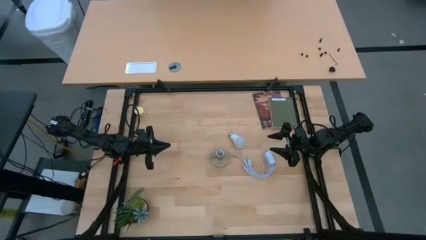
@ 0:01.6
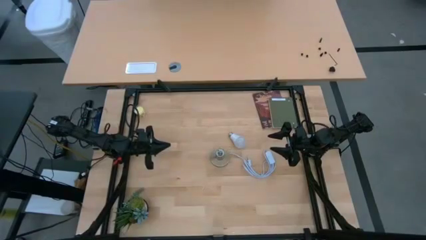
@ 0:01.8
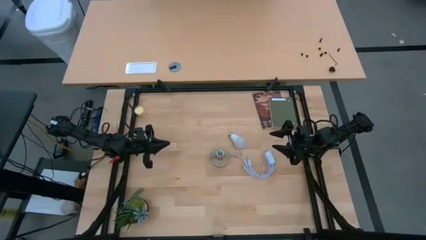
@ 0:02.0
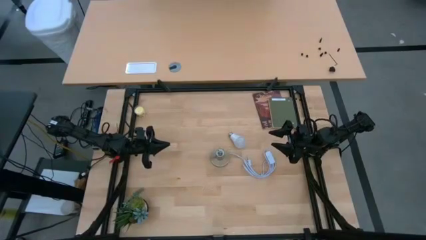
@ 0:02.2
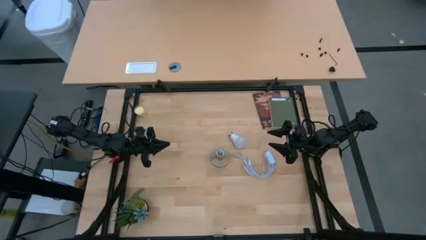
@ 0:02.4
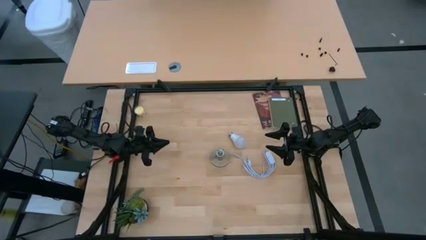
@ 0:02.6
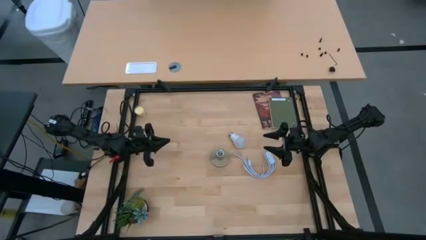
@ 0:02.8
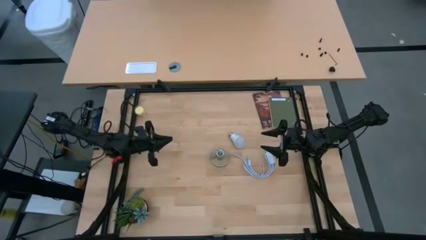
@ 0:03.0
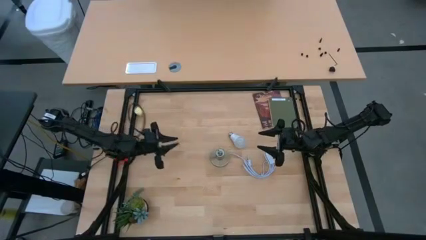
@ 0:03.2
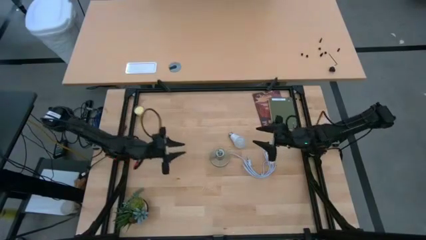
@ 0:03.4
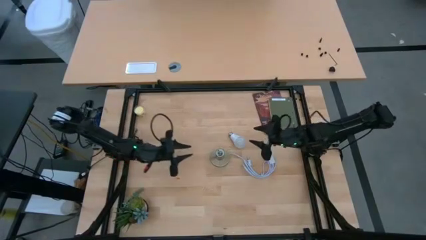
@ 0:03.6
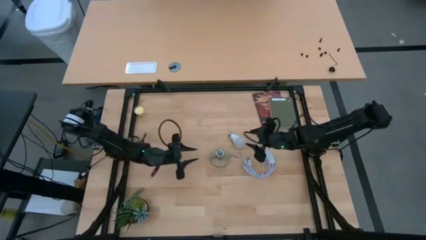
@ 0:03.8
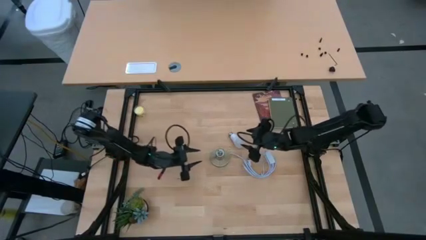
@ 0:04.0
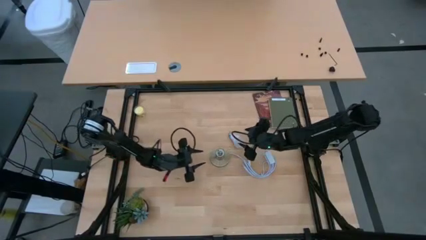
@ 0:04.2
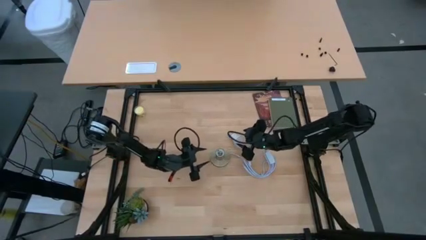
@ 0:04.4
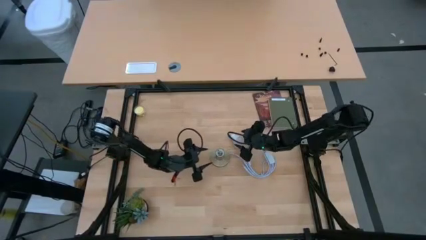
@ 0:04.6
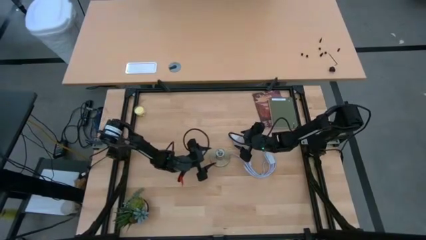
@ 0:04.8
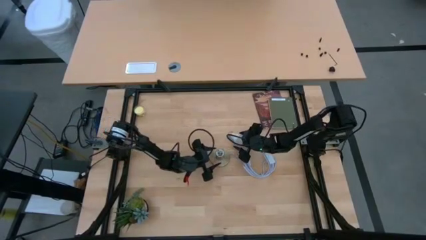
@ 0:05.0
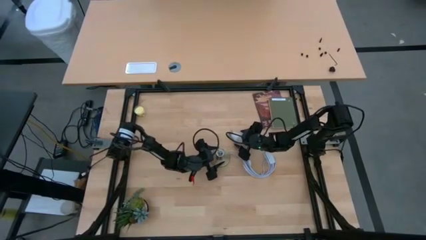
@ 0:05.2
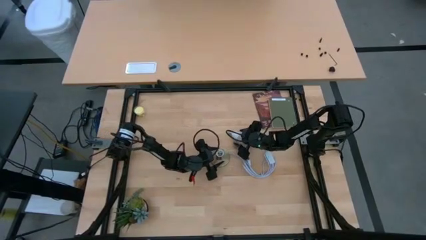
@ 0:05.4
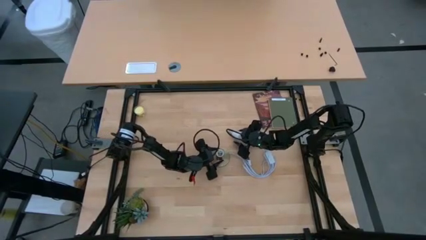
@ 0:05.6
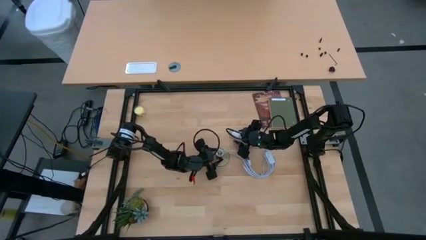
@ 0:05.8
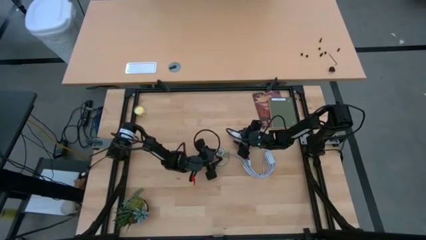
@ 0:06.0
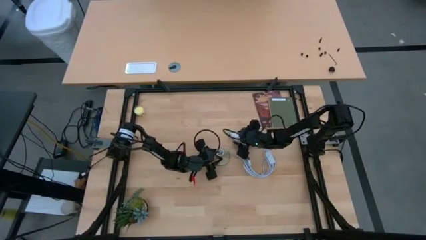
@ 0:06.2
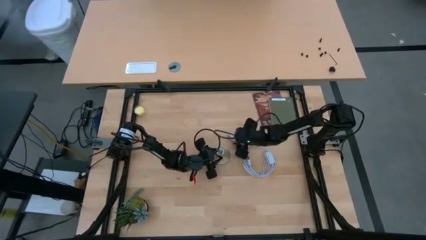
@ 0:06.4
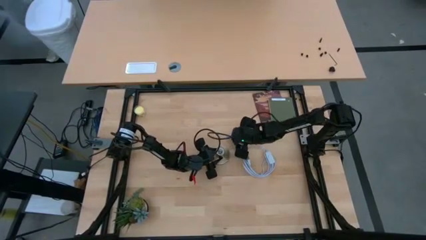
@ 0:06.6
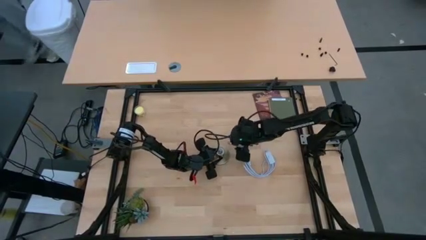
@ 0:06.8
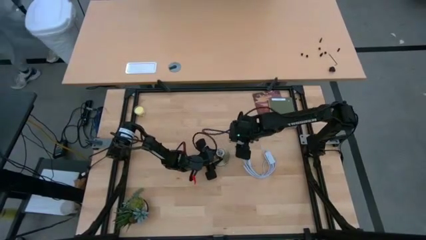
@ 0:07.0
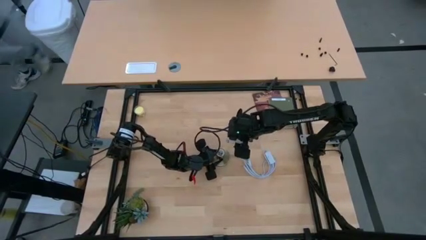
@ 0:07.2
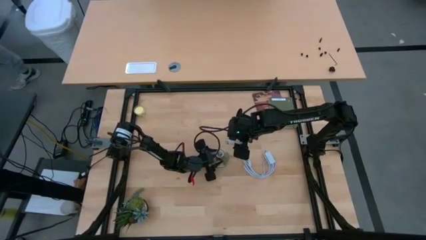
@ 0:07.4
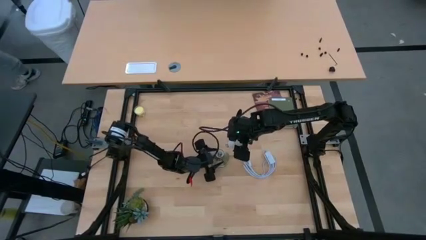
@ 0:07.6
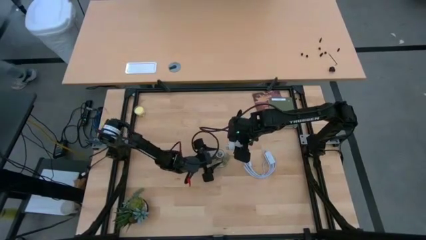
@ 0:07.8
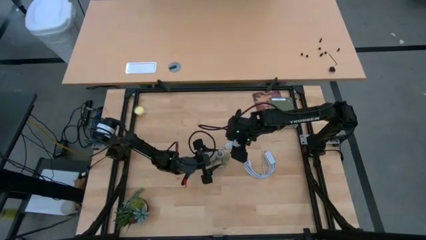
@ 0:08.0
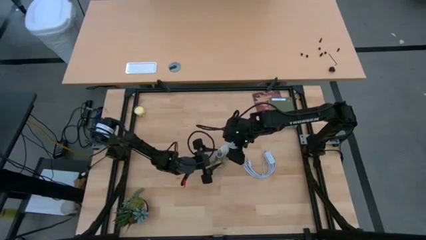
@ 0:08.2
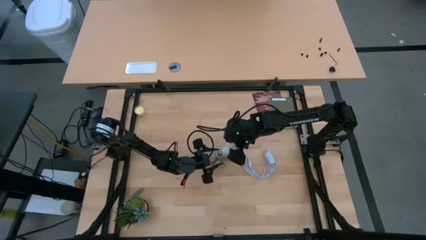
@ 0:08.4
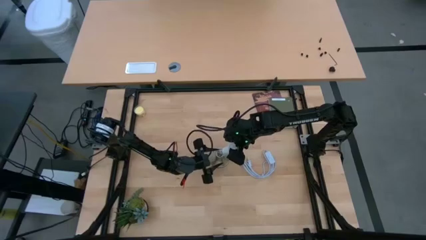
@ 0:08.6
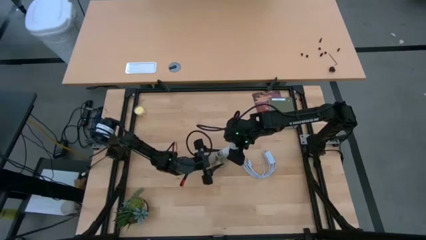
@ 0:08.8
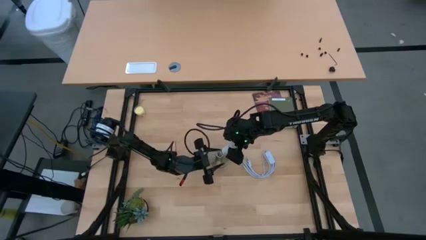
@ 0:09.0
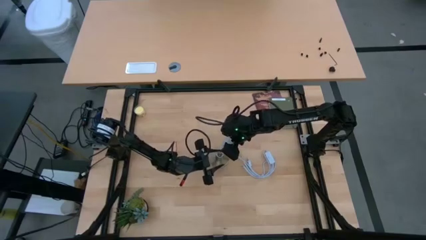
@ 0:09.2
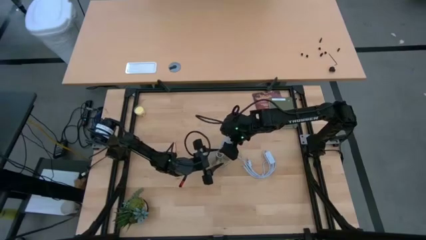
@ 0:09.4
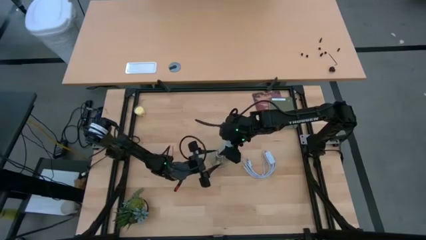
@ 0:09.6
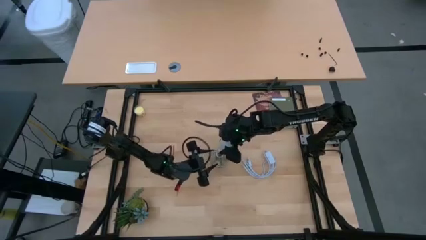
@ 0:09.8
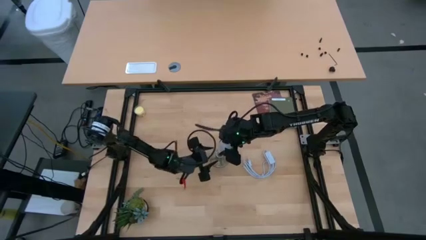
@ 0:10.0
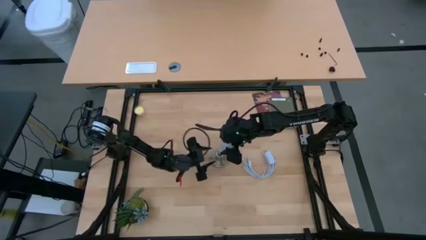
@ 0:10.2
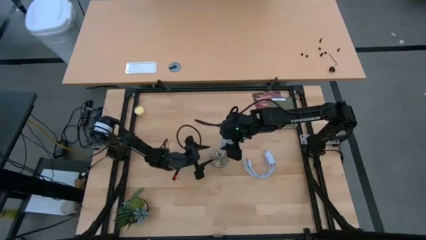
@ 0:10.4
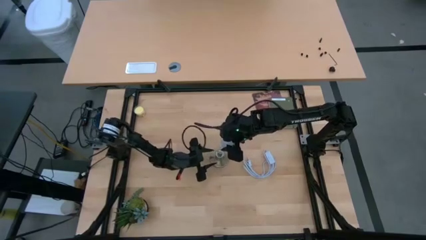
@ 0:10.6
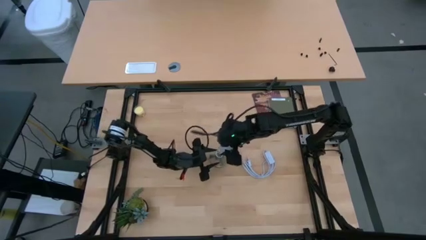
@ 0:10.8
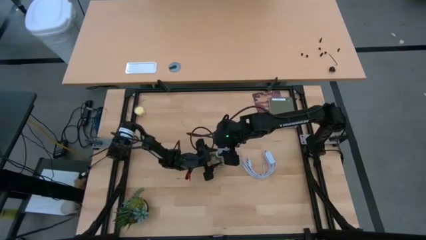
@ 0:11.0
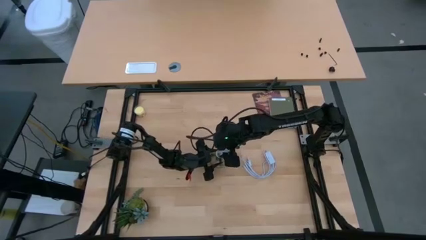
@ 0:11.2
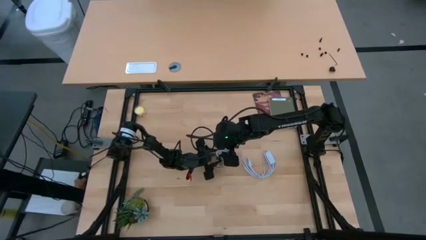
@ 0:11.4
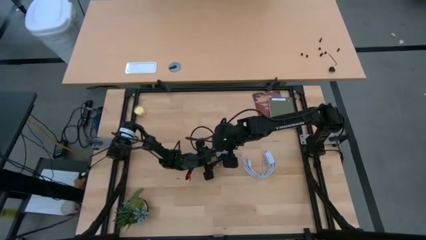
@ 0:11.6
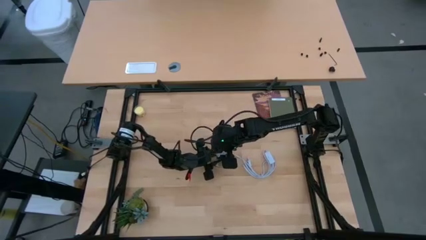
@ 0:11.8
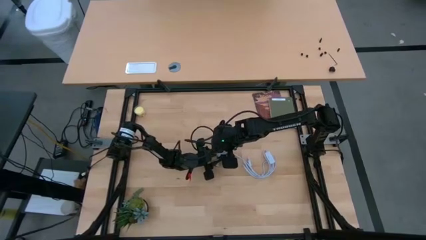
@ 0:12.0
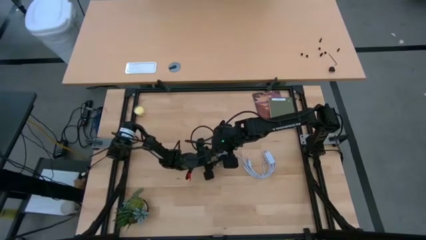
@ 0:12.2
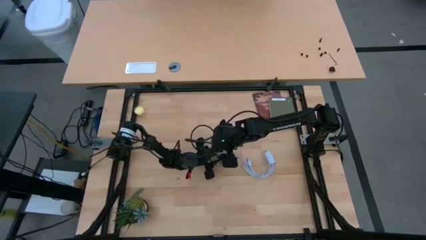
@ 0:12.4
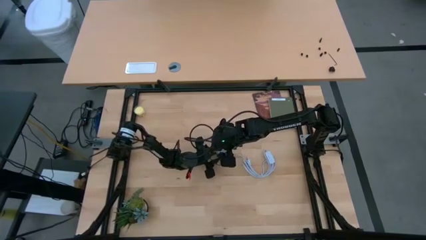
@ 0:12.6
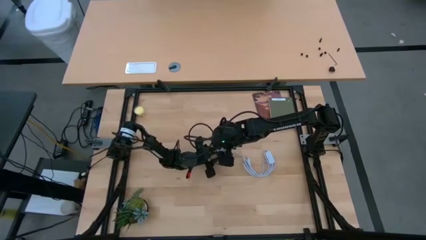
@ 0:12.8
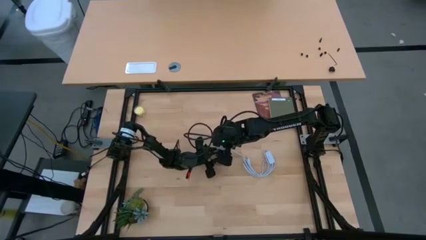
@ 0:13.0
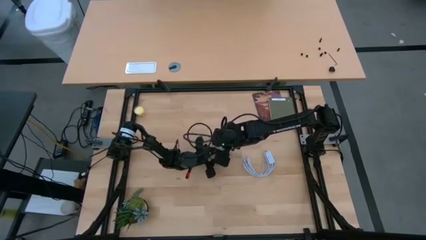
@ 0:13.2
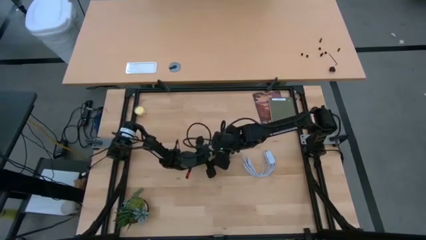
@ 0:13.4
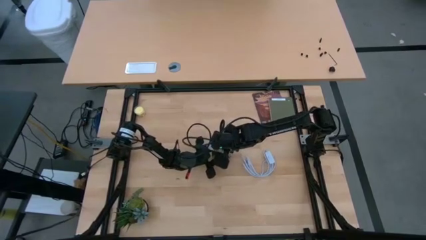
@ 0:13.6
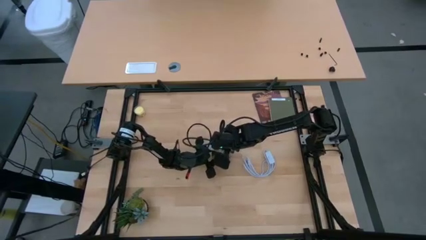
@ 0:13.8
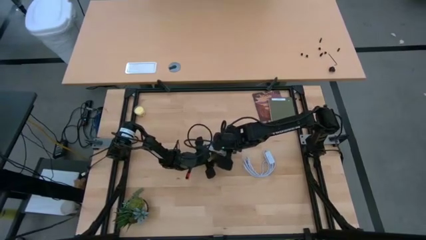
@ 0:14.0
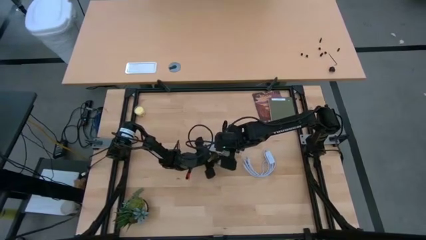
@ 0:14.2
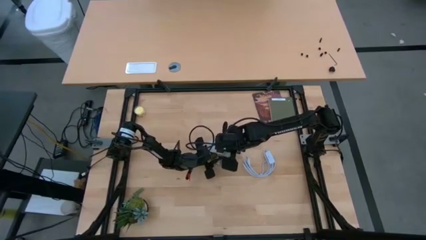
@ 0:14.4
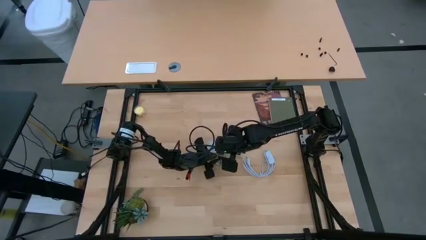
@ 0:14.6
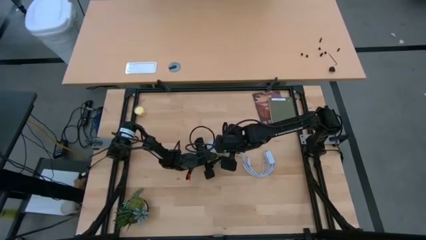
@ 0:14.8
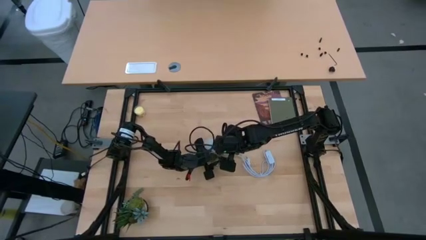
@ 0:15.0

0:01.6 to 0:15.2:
Task: Screw lightbulb
Insert the light bulb into the lamp
